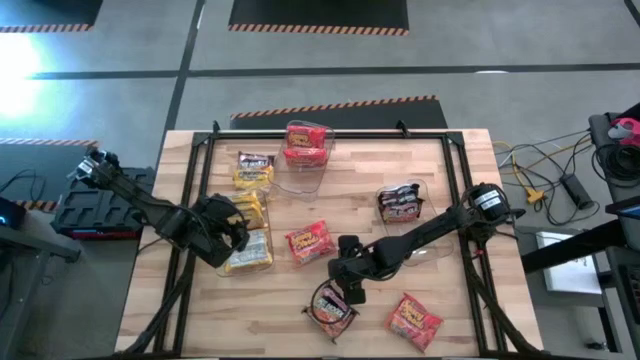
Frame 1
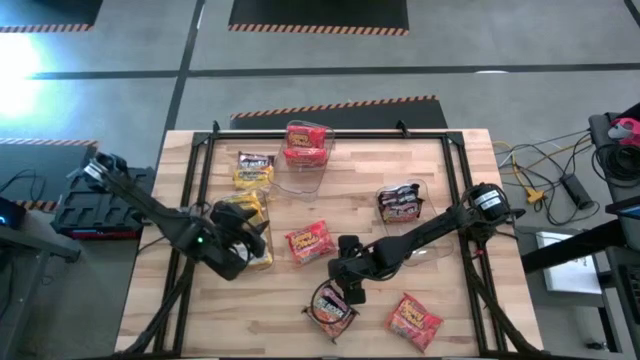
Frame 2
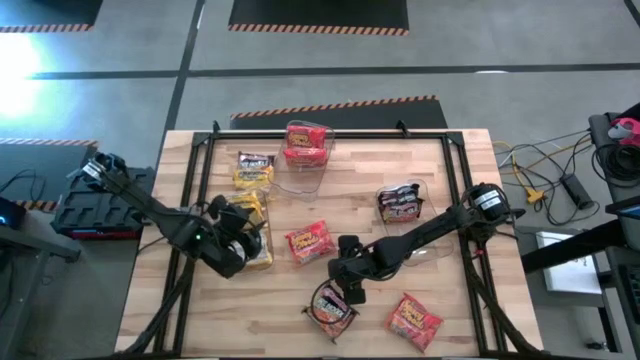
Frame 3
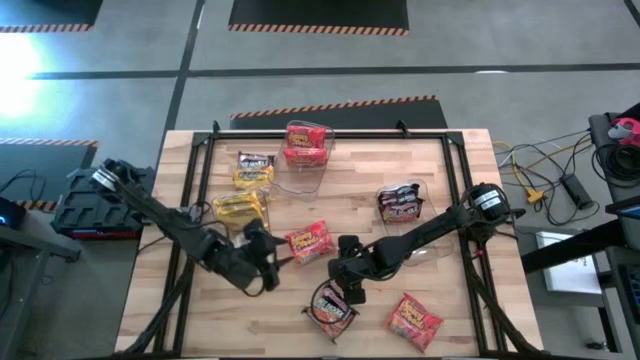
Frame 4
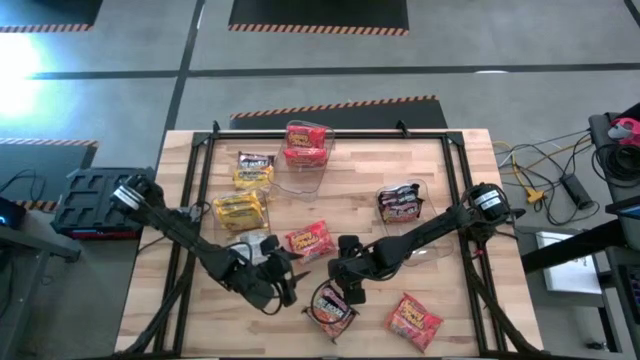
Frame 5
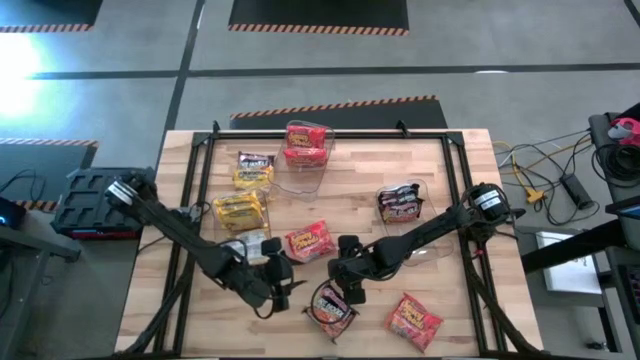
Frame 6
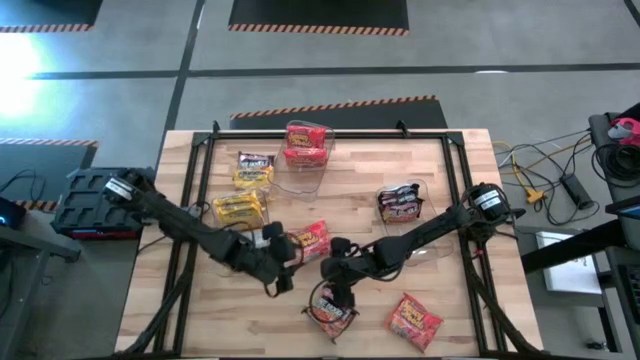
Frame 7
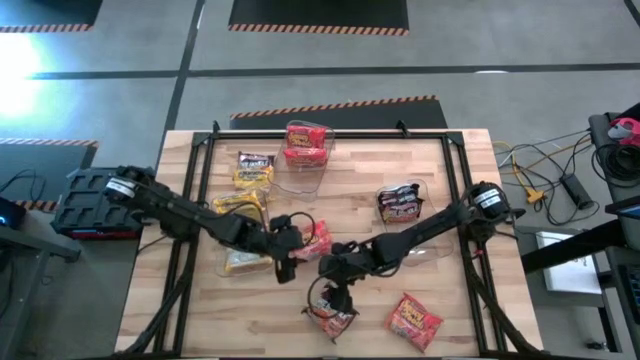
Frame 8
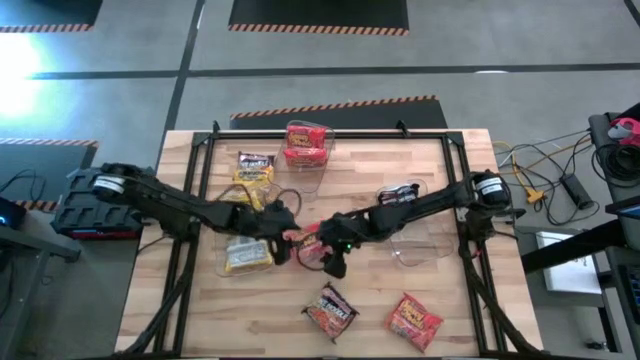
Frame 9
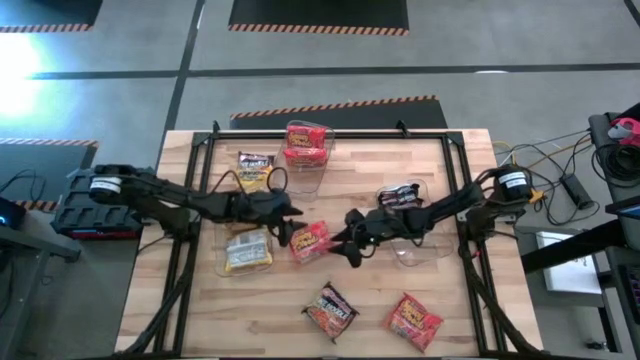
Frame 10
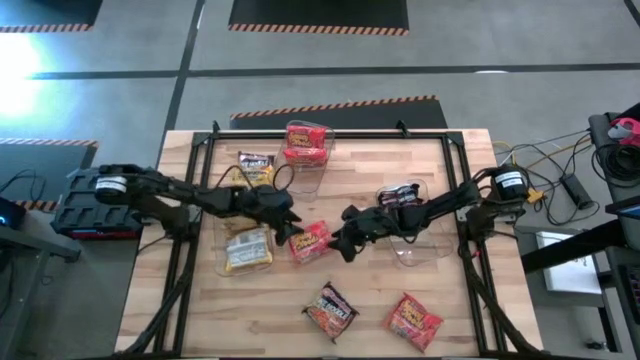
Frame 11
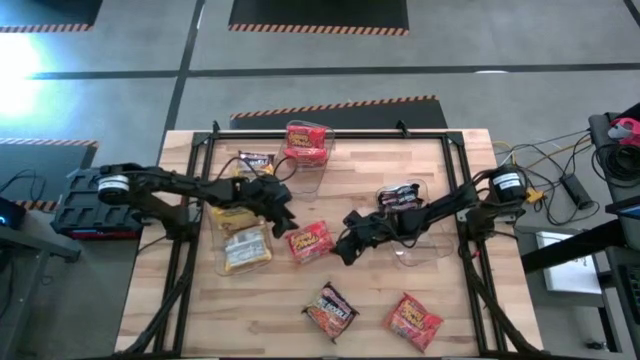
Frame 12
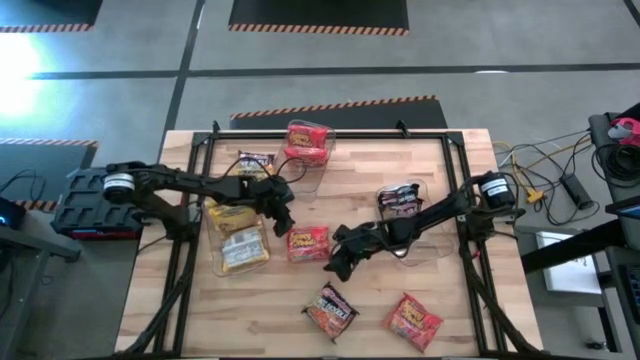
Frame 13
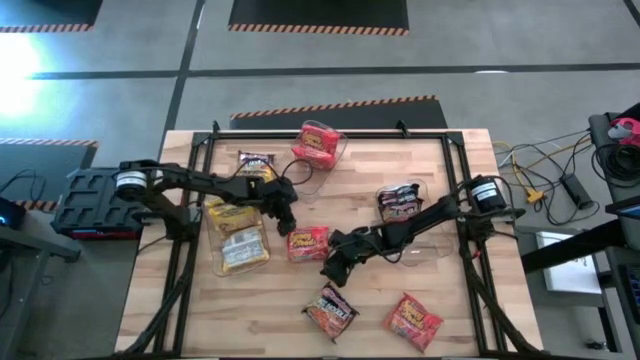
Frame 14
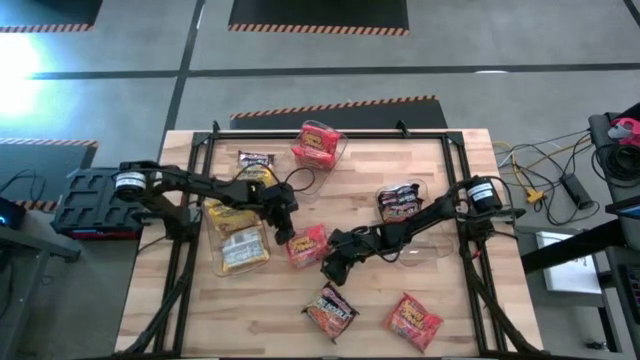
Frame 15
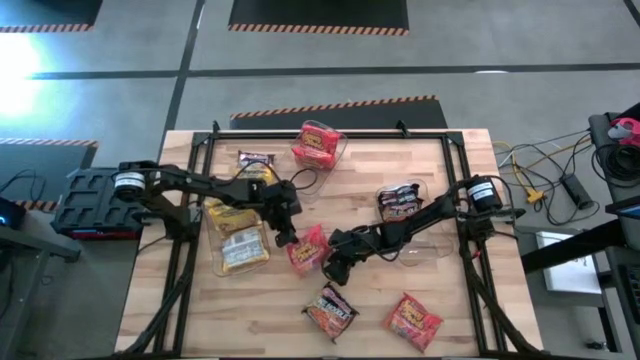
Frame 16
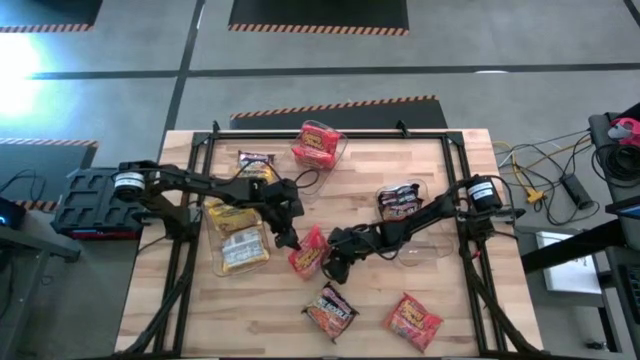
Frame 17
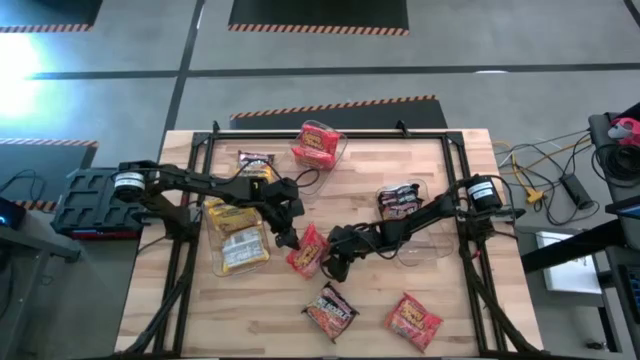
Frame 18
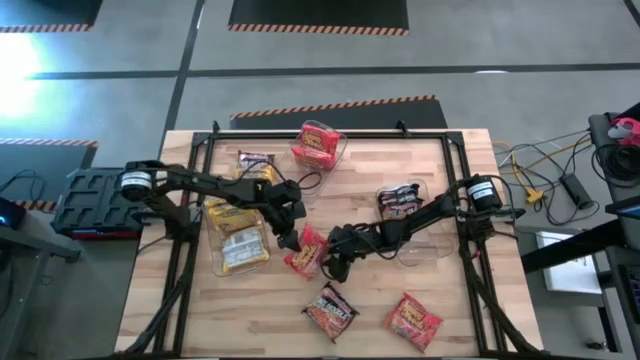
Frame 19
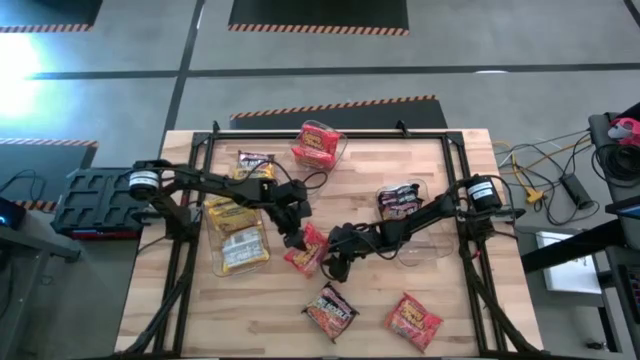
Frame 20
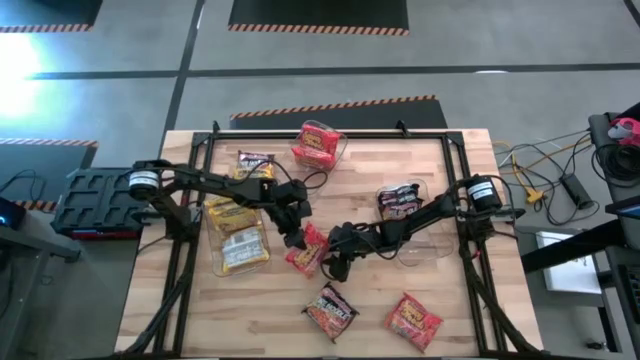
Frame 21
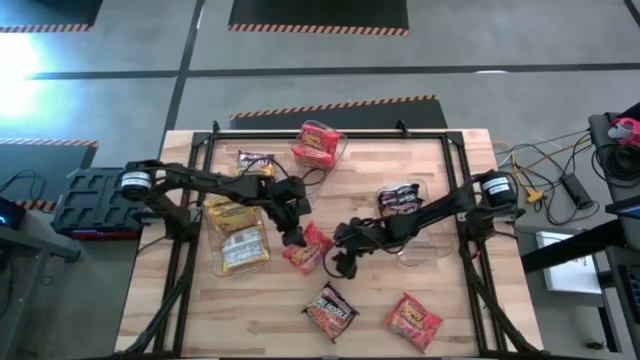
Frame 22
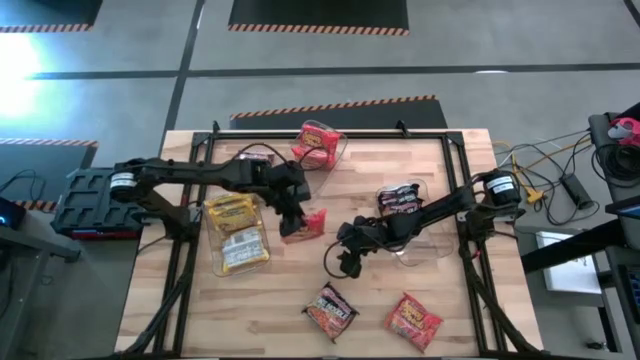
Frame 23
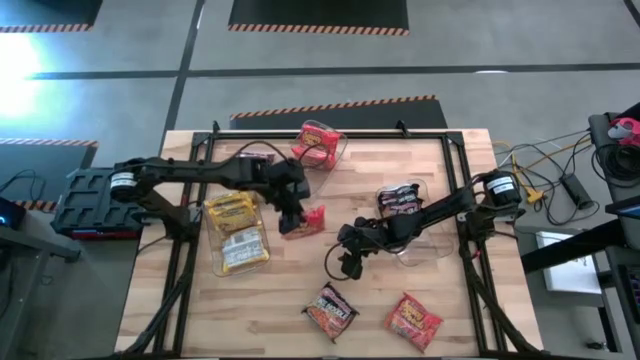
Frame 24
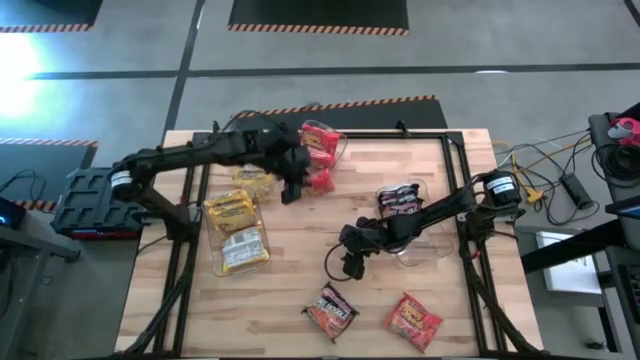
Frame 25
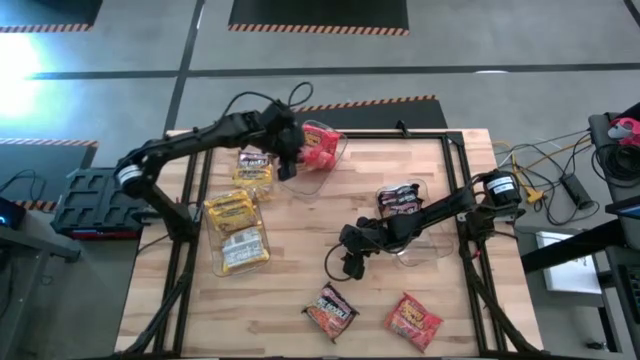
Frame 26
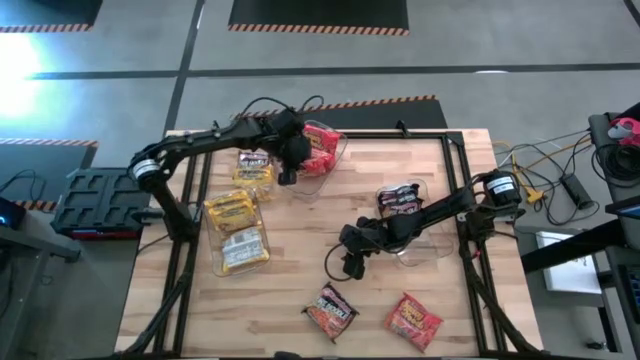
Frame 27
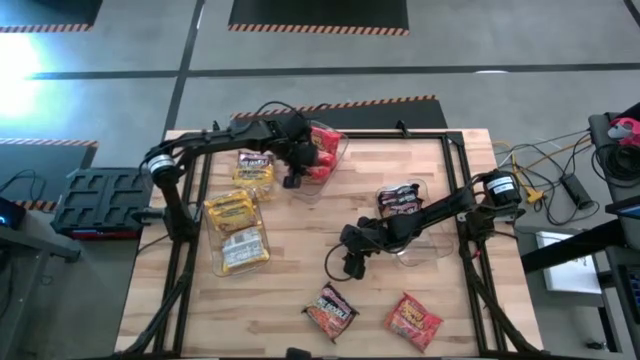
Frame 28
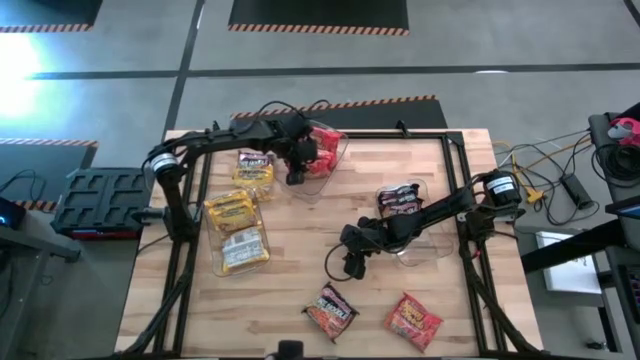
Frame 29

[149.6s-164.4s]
Task: Sort Maruchan noodles
Put the top orange pack noodle into the top transparent bin

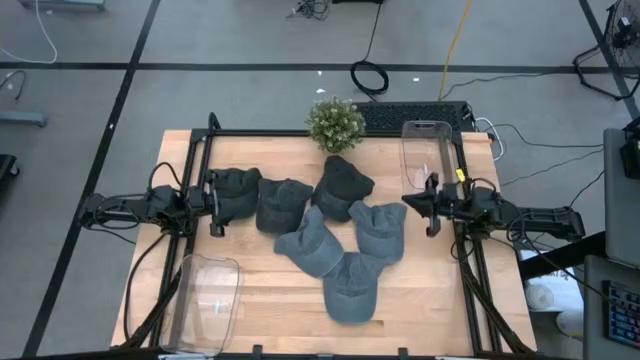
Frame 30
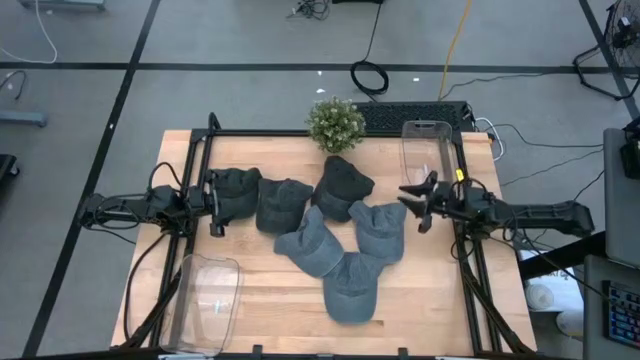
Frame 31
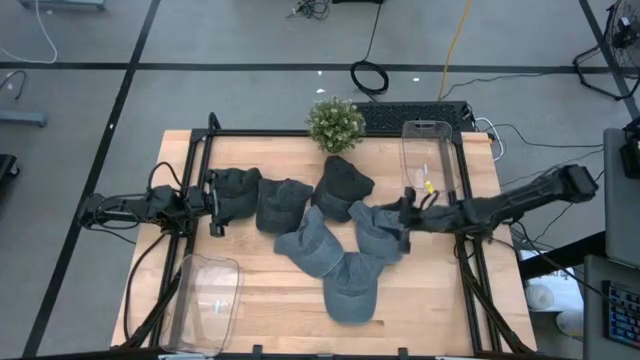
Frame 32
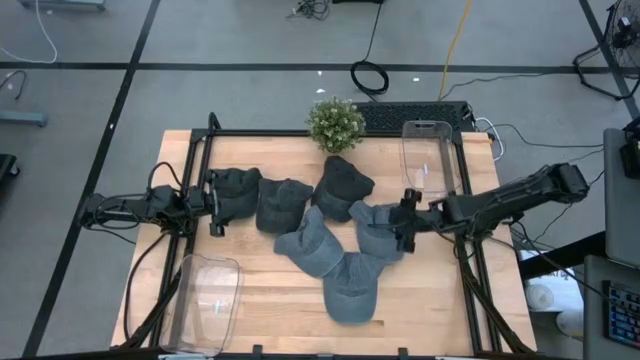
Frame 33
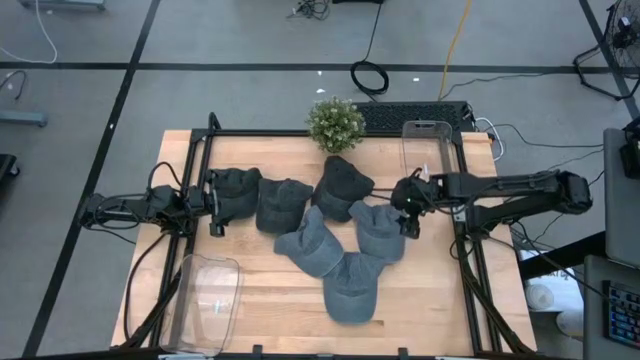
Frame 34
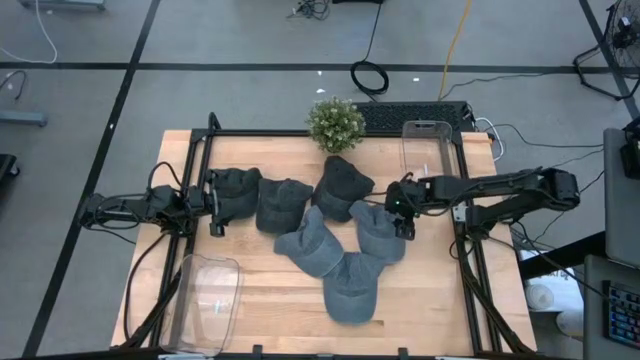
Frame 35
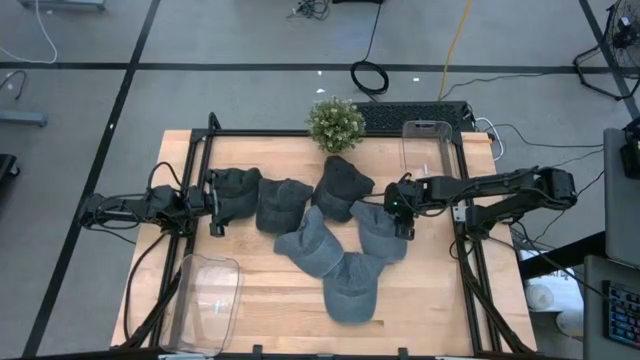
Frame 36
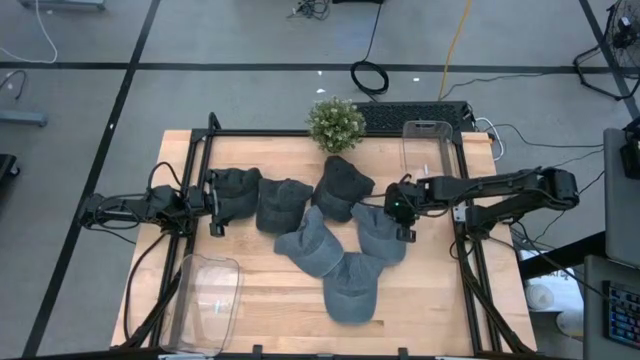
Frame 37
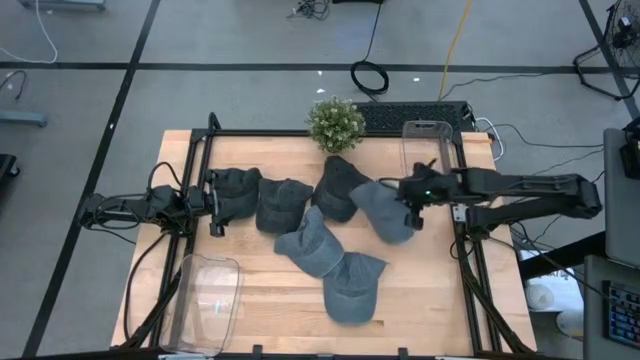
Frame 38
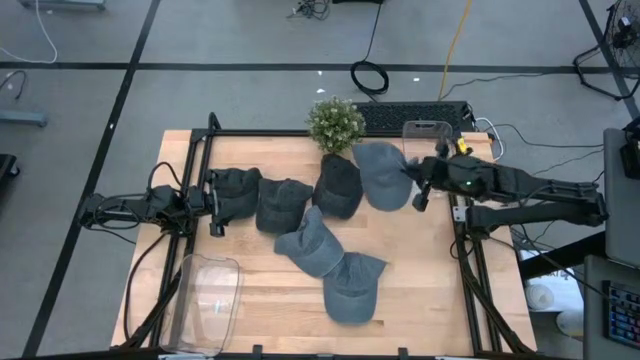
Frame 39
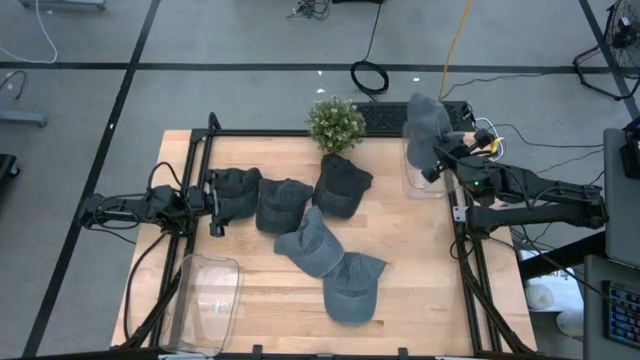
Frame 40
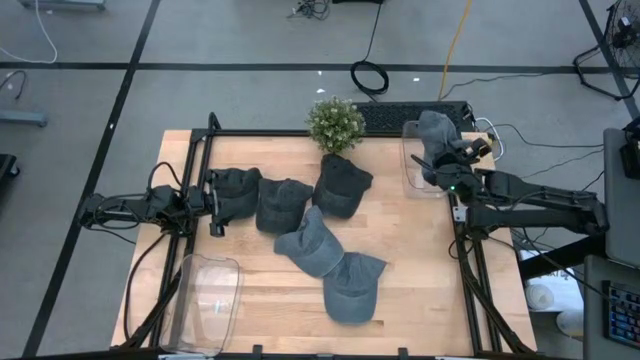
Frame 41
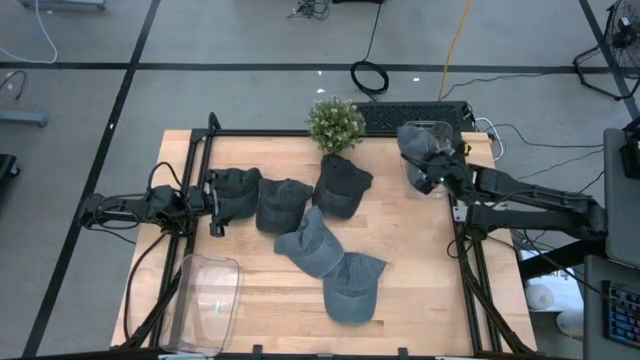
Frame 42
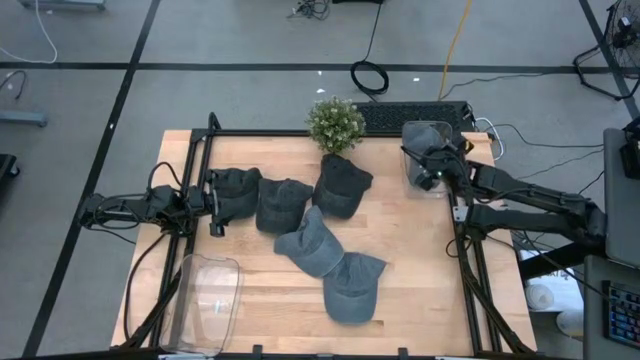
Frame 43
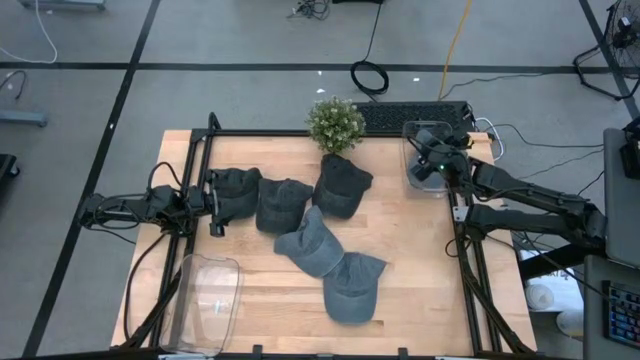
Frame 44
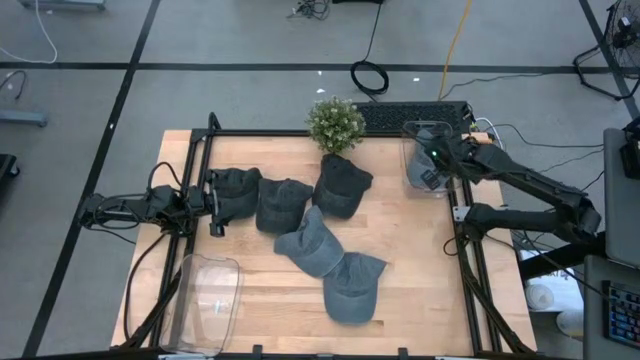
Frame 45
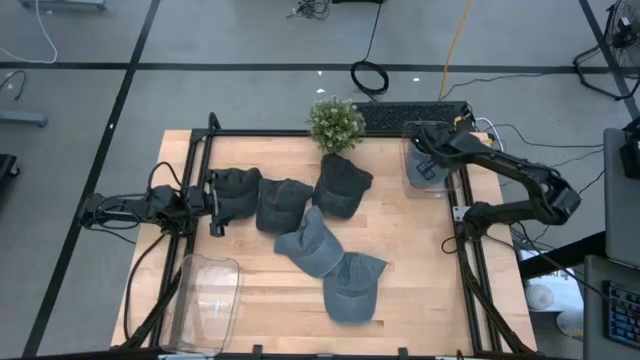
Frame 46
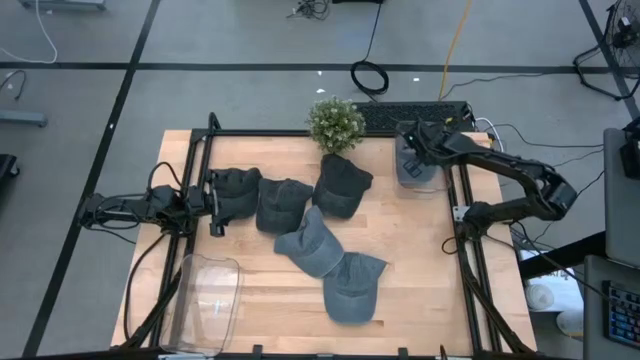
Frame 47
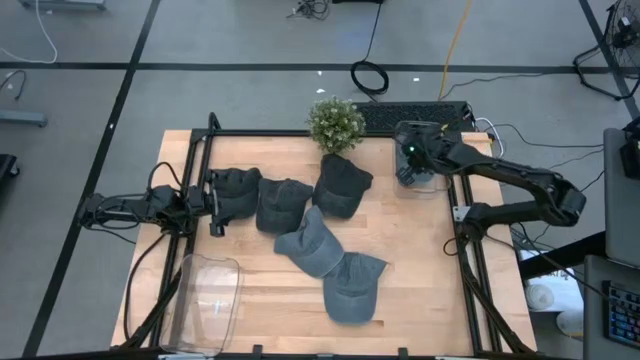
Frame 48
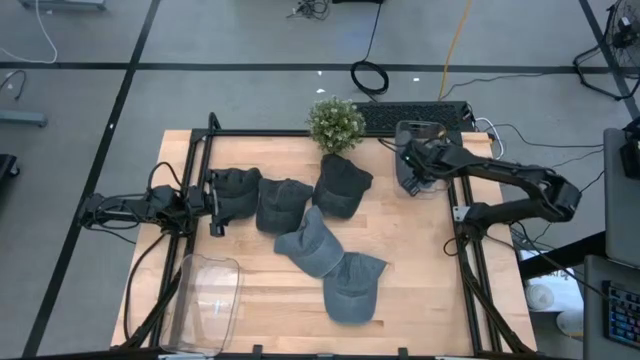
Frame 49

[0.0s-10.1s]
Task: Pick & Place hat
Put the top right gray cap into the top transparent bin
